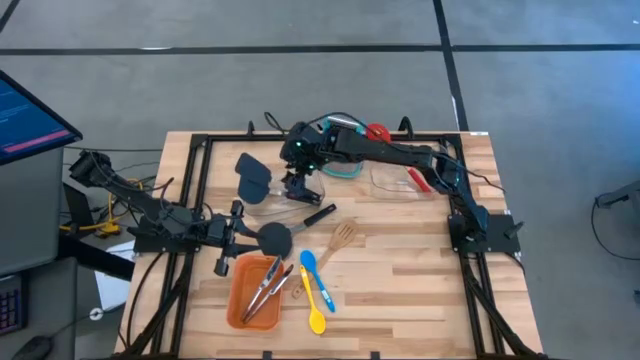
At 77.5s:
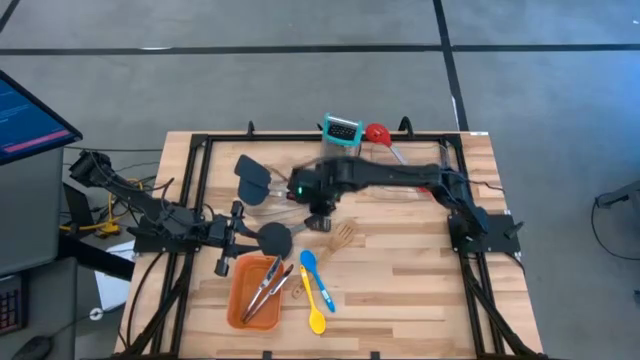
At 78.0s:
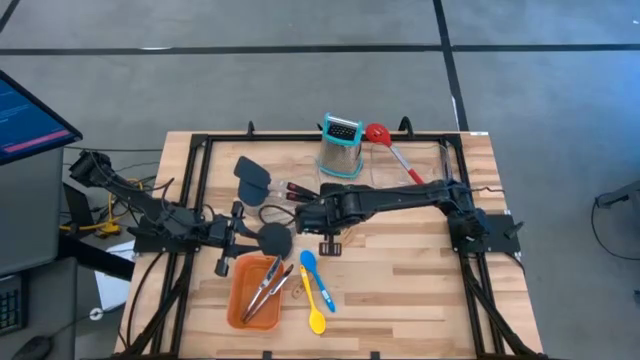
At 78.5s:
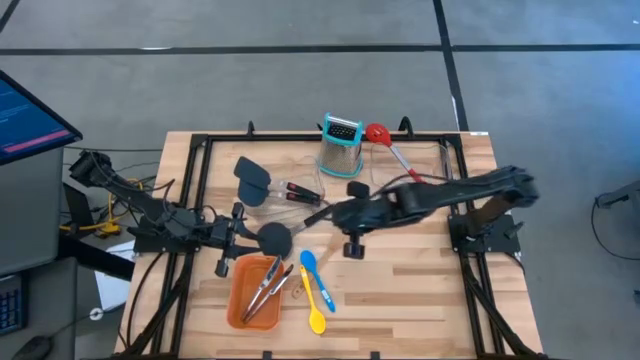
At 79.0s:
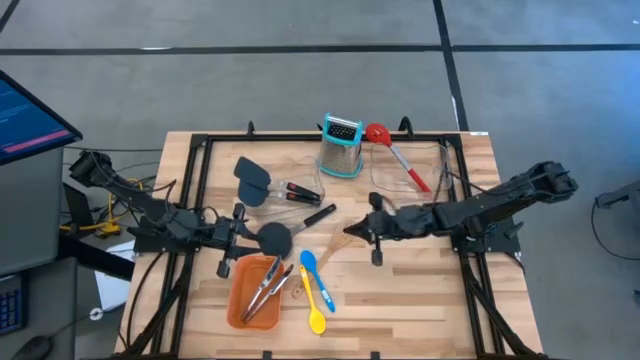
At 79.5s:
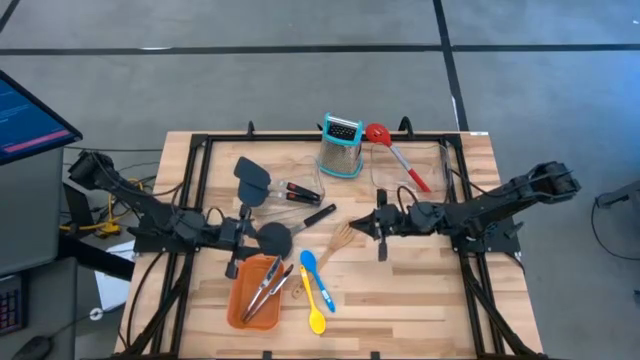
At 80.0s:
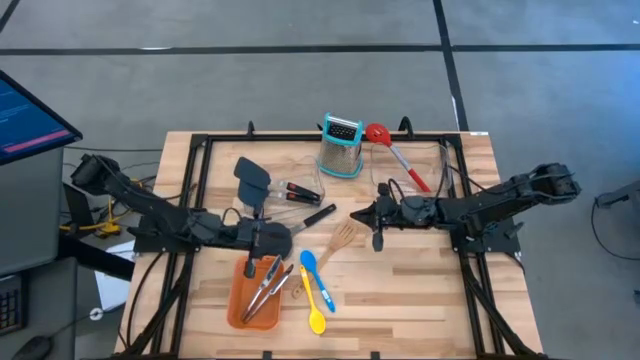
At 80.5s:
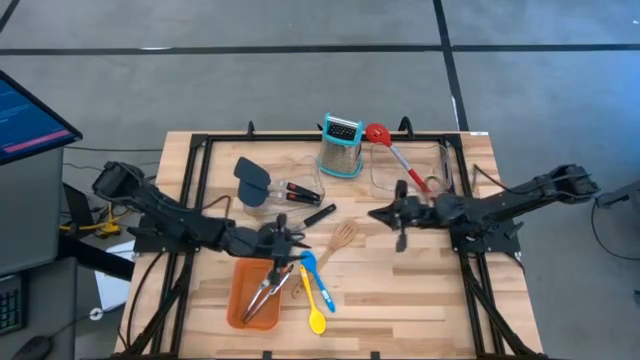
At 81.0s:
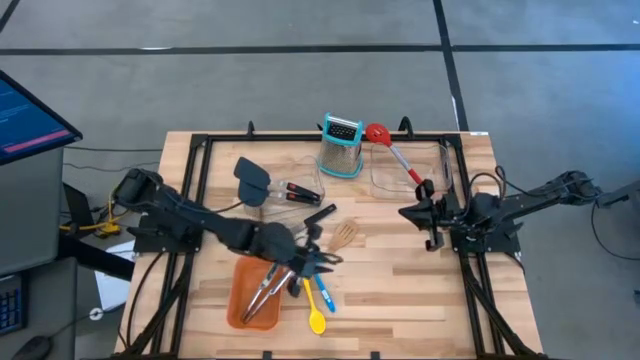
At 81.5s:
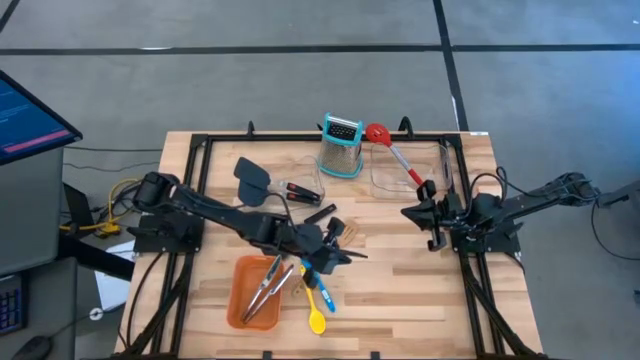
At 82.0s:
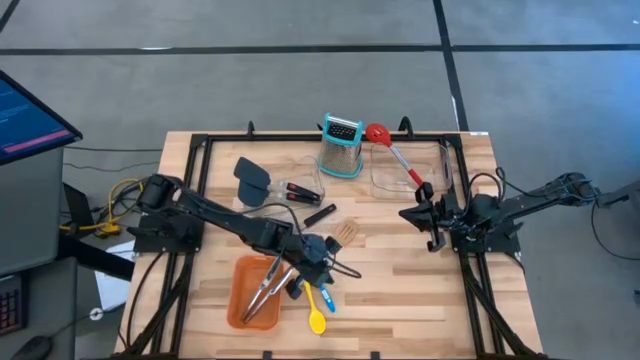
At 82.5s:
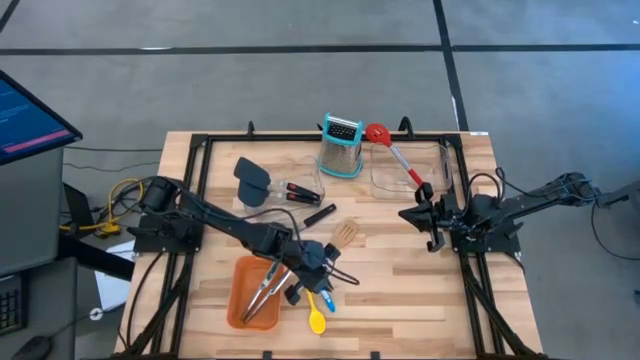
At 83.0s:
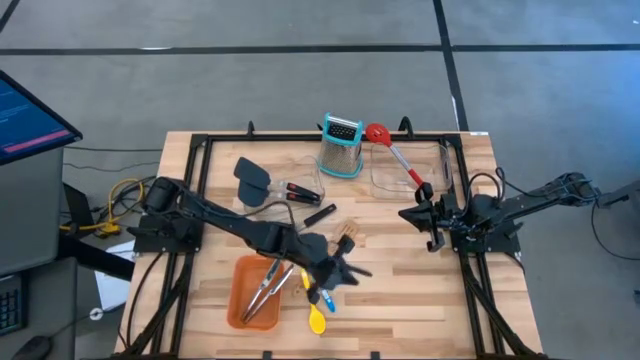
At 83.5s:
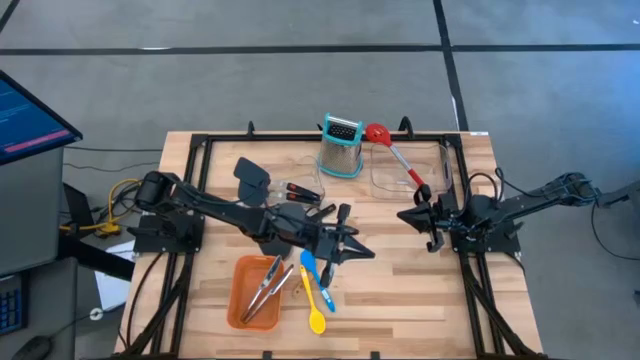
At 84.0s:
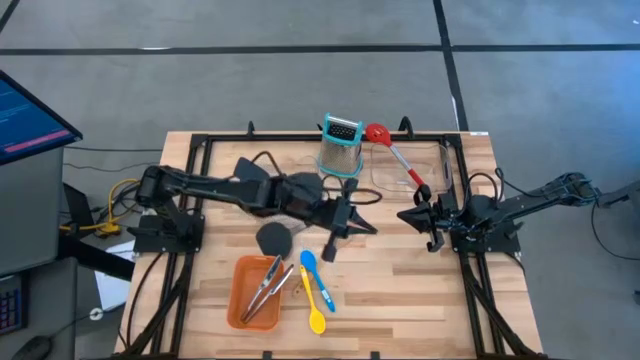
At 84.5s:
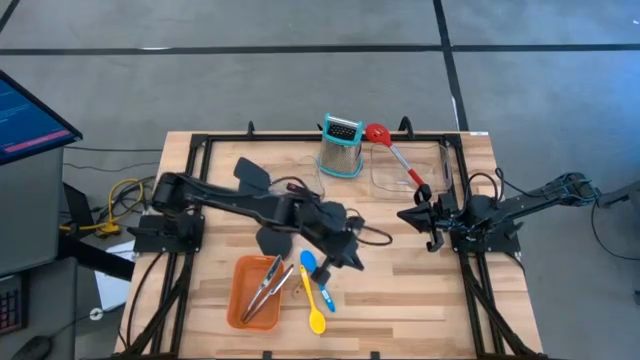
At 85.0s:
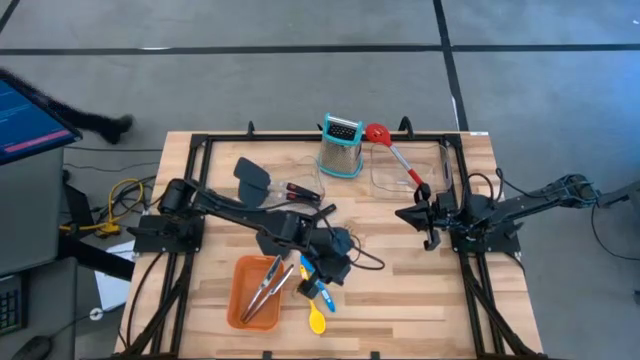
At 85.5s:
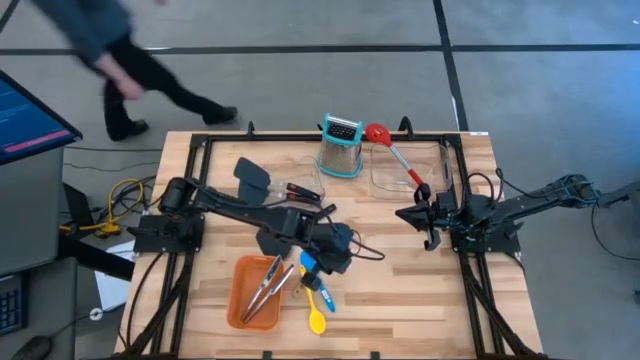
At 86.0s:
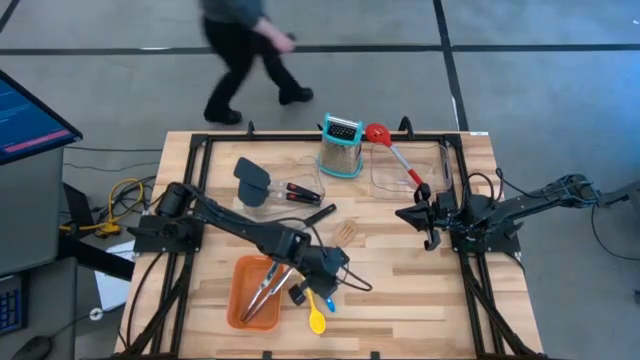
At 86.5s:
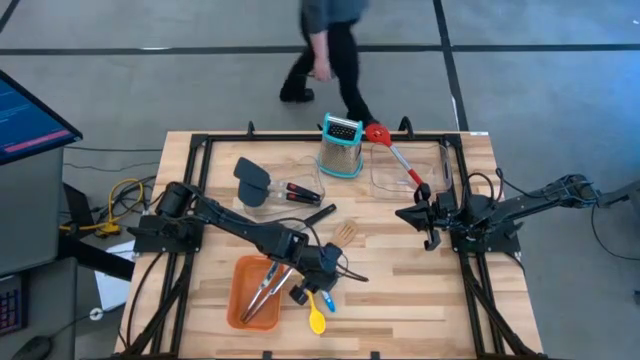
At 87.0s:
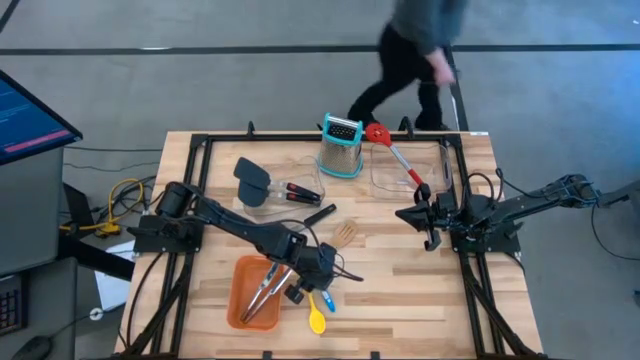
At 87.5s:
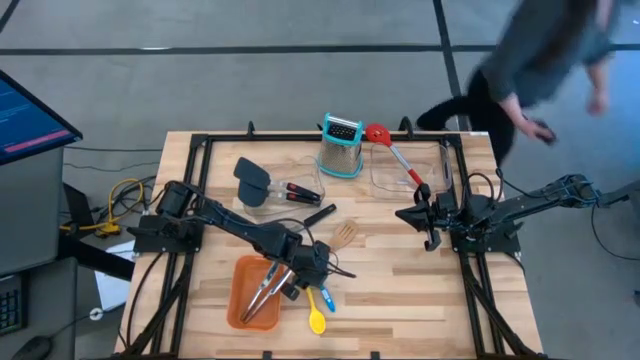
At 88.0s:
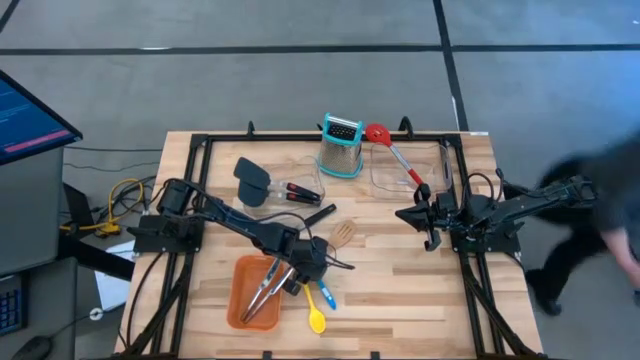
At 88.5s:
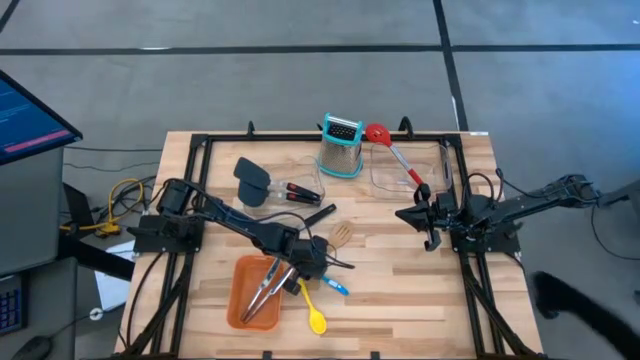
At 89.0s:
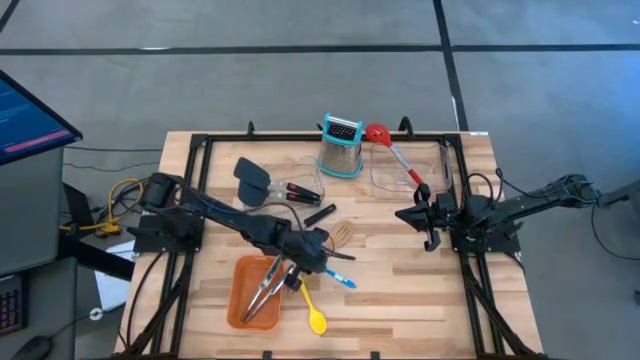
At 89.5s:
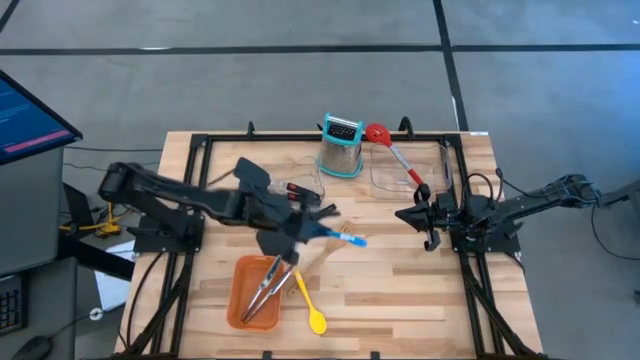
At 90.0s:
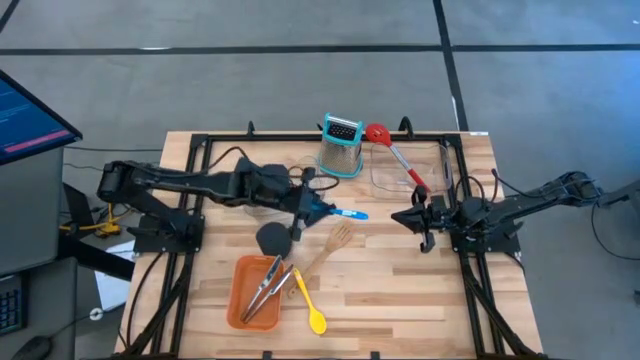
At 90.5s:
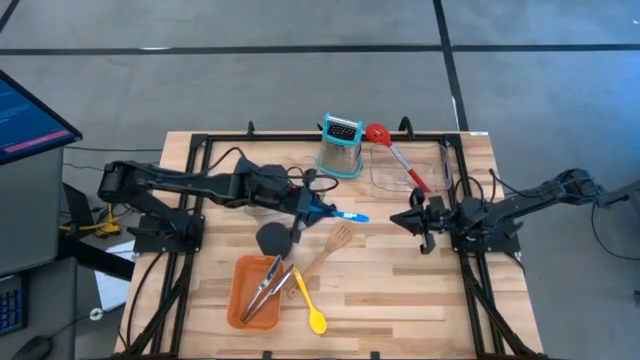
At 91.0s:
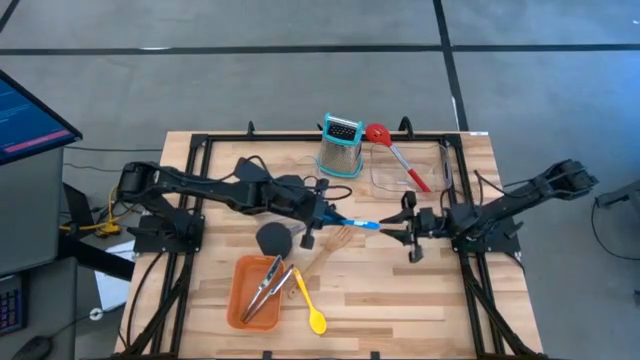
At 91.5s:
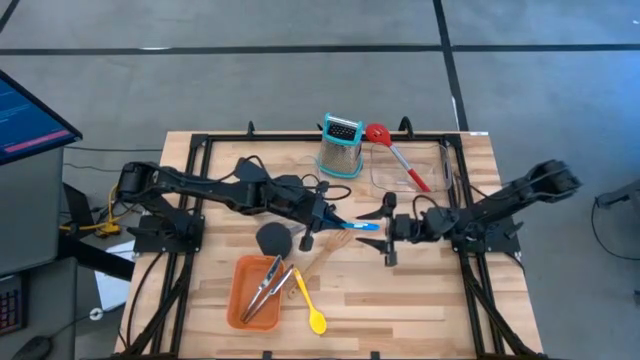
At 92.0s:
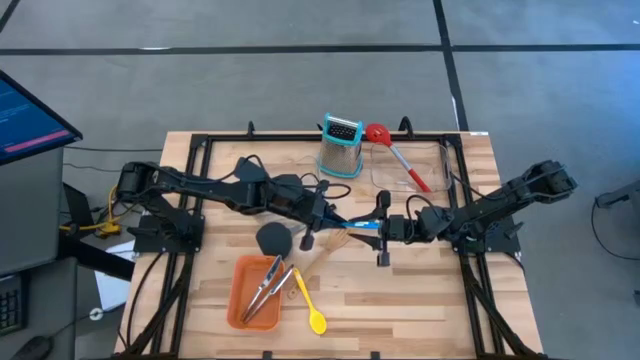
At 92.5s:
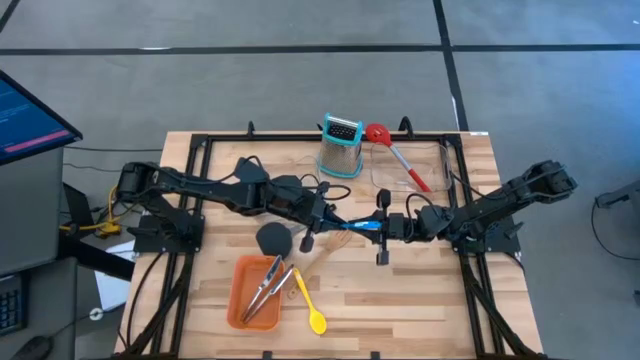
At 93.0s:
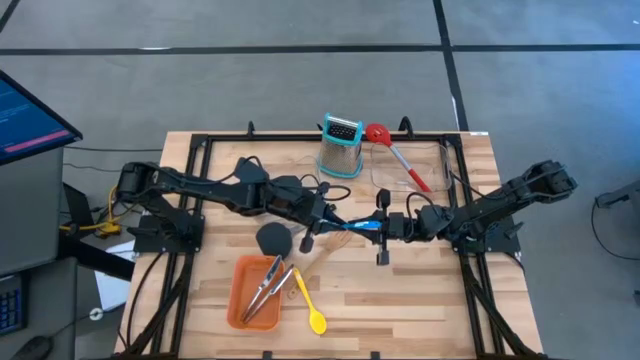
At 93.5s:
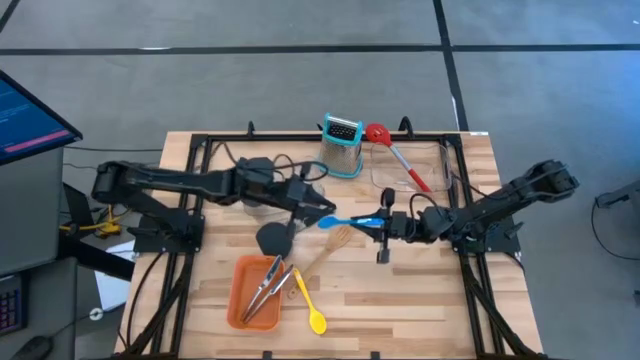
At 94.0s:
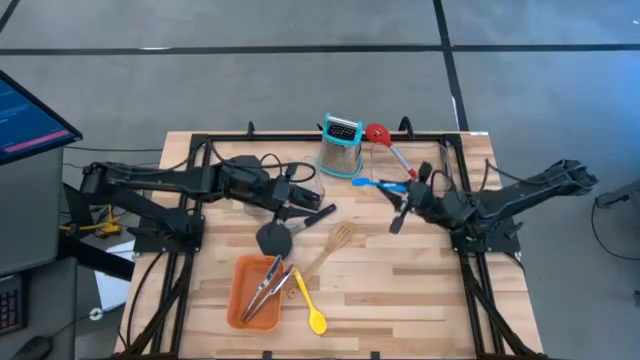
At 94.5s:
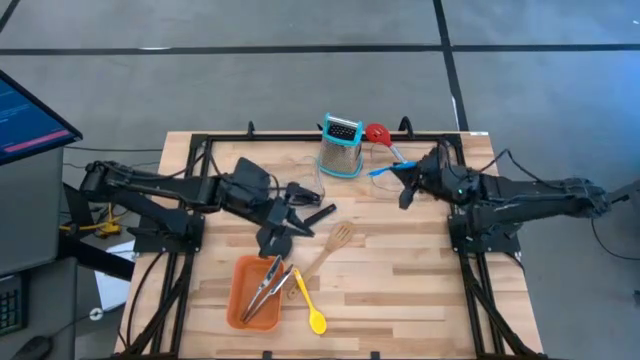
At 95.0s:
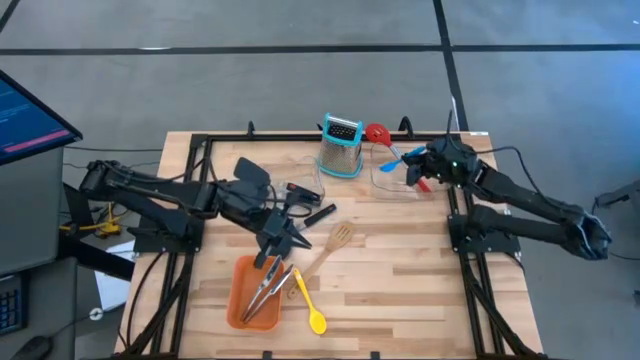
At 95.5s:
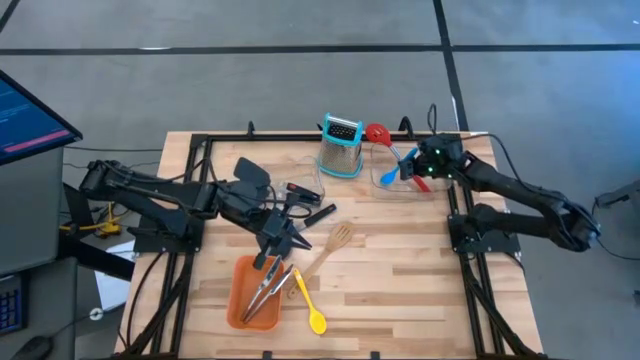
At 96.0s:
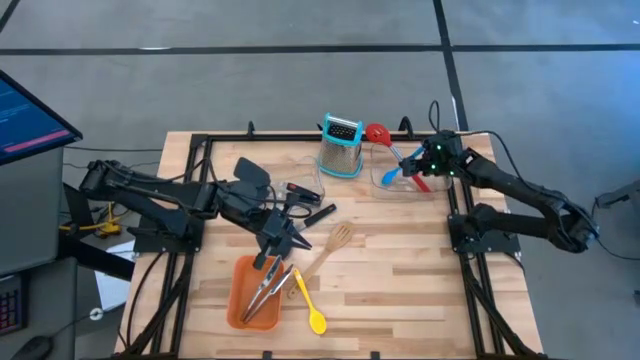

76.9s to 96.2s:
Task: Pick & Place Kitchen Items
Put the blue serving spoon into the right transparent bin
